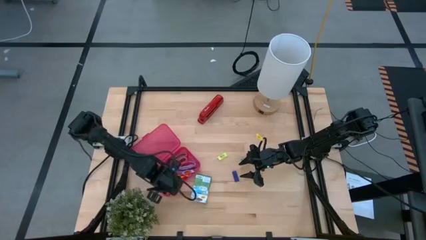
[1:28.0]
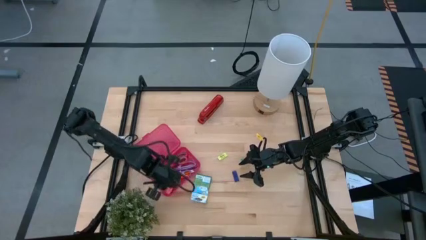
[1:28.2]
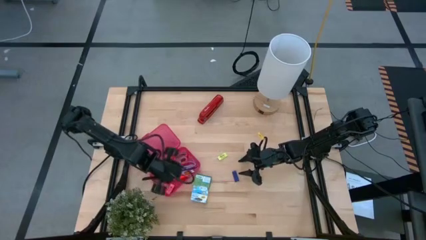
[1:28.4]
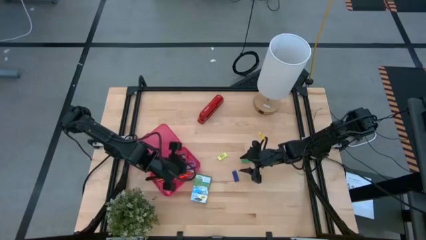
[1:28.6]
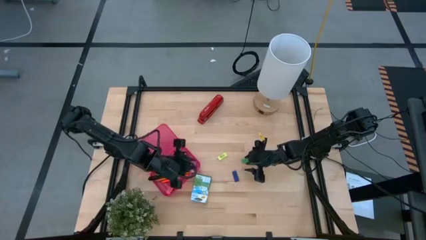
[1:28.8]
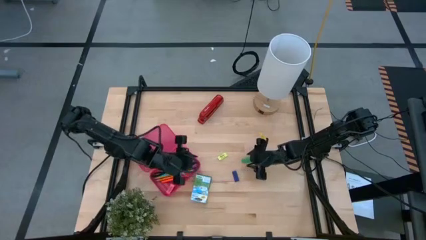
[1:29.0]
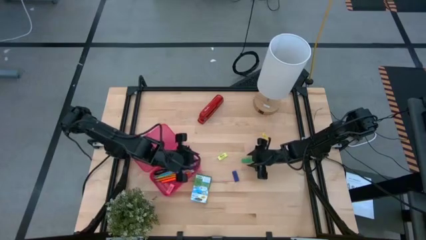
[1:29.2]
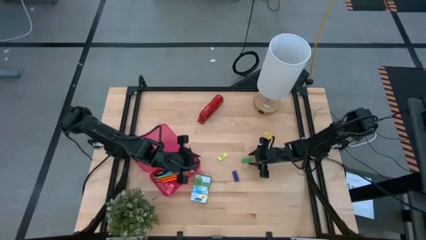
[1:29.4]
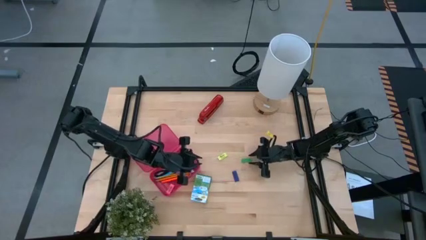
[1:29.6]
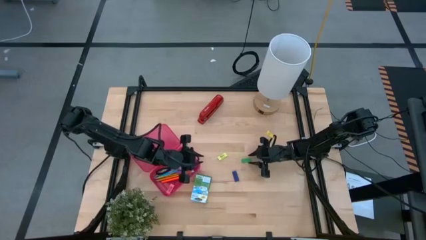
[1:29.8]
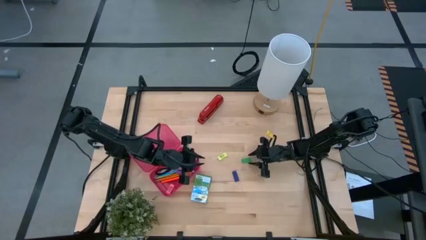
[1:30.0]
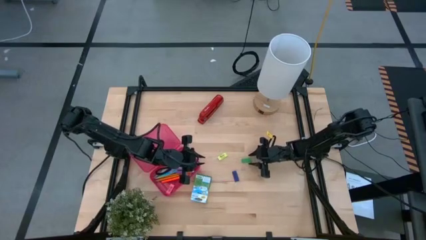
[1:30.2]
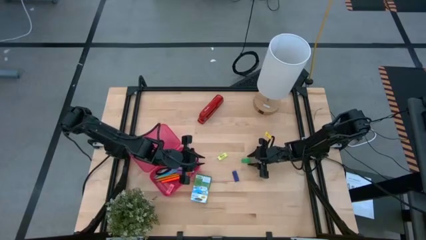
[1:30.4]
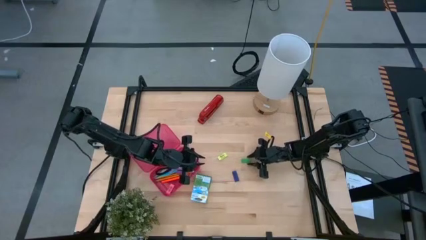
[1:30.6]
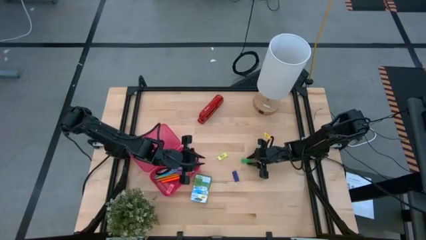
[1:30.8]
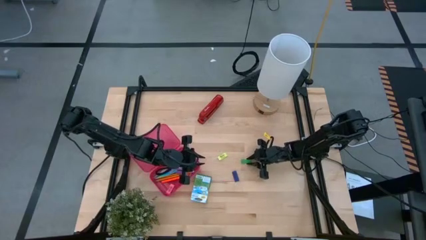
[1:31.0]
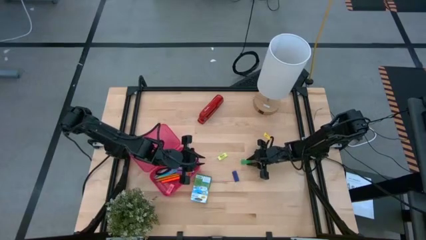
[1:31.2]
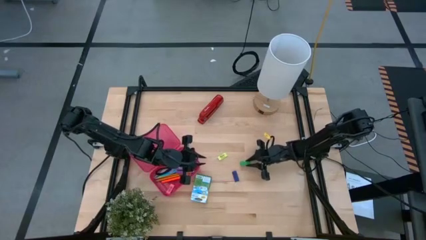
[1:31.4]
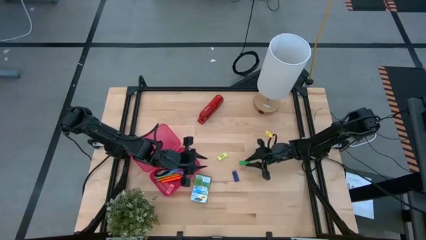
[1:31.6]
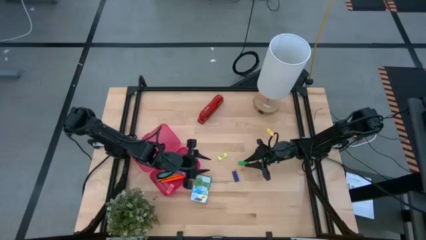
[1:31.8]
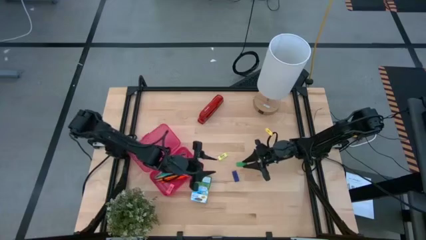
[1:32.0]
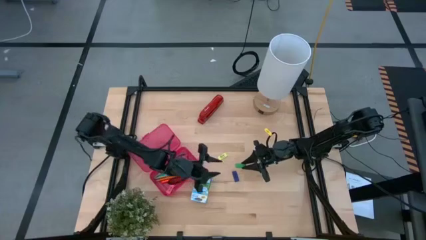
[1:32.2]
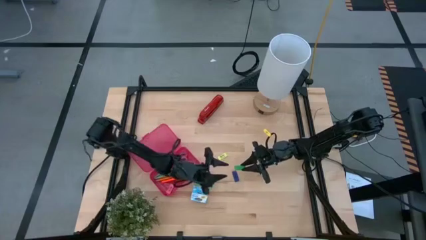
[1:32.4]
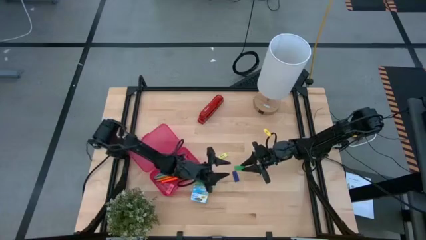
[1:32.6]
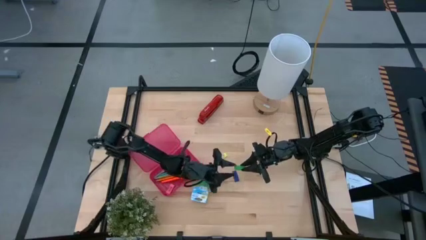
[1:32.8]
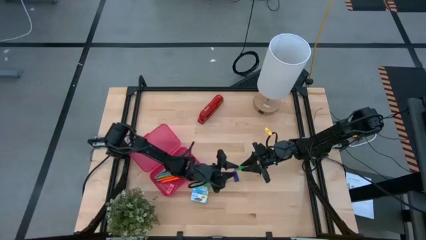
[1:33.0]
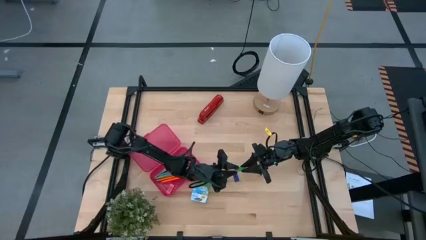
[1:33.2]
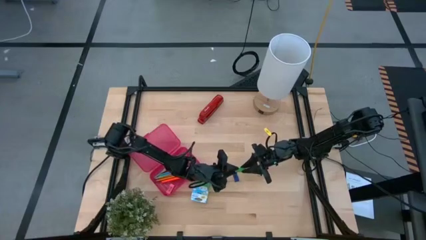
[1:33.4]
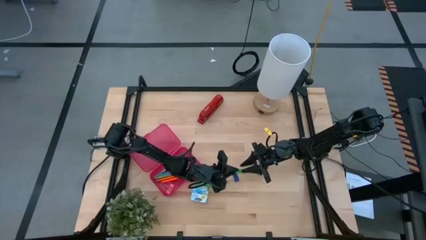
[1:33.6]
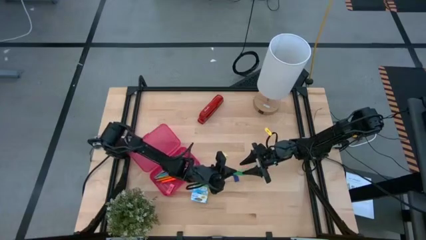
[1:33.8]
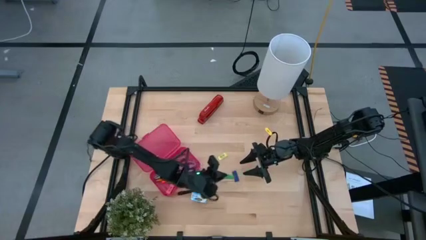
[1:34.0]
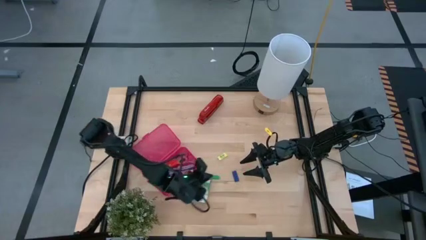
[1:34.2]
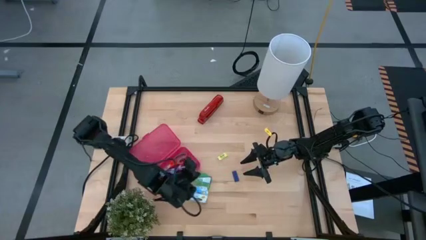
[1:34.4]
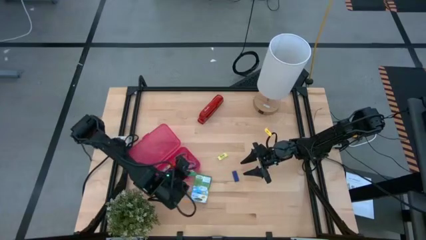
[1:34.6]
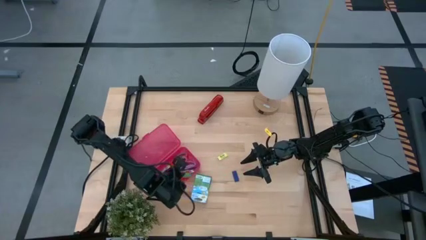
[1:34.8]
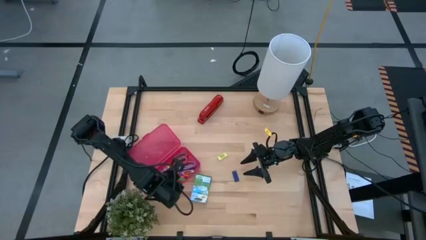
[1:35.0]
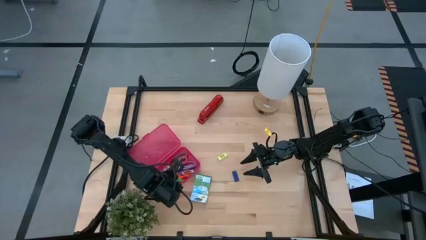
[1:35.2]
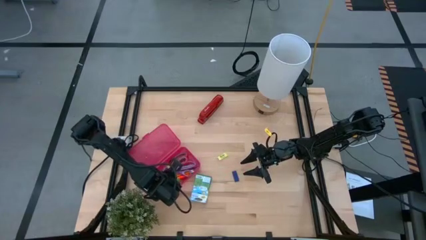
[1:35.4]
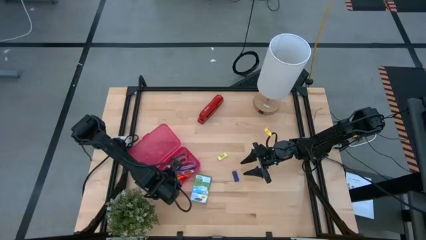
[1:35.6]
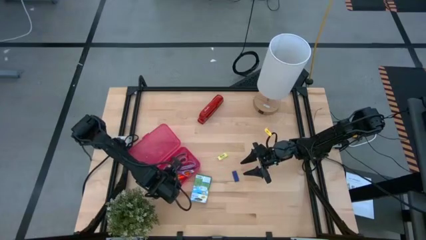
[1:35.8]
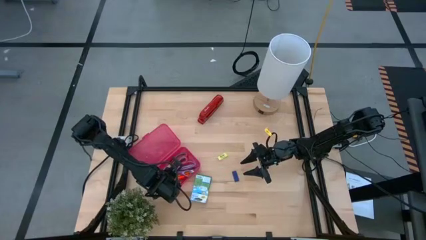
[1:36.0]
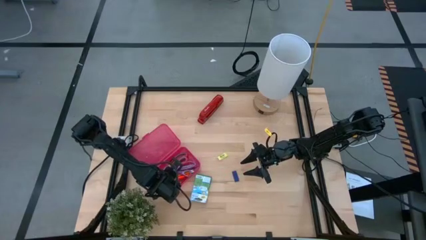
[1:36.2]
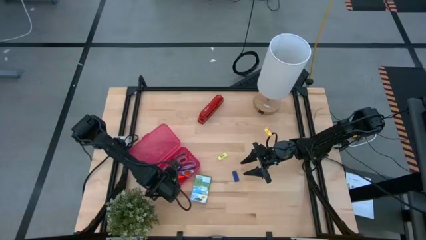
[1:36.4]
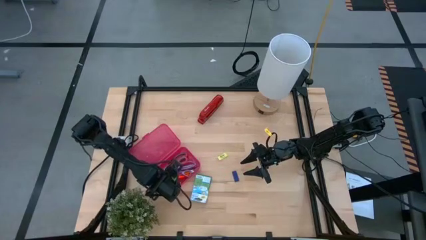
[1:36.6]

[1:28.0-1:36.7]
Task: Pack school essentials
Put the green eraser into the red supply box

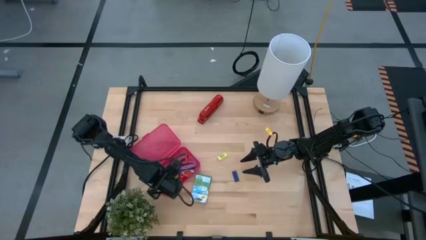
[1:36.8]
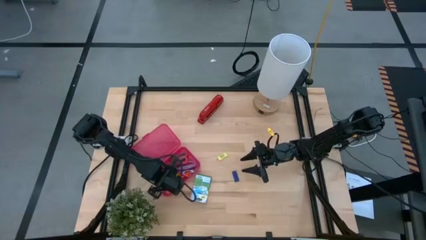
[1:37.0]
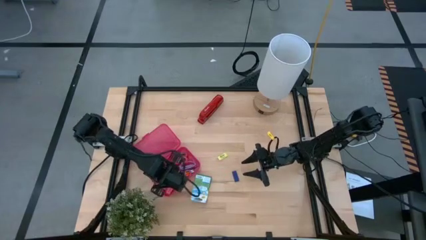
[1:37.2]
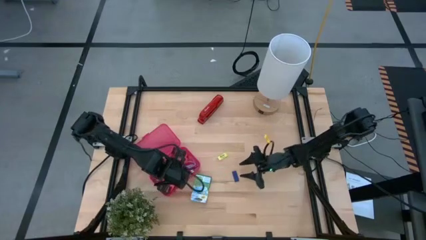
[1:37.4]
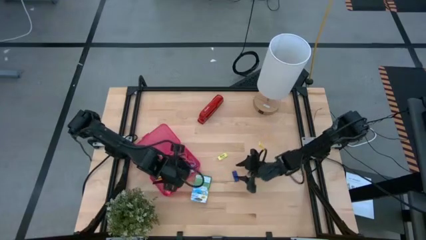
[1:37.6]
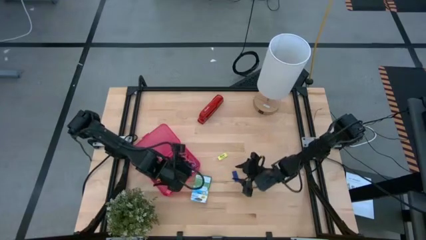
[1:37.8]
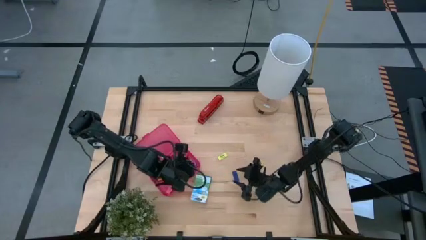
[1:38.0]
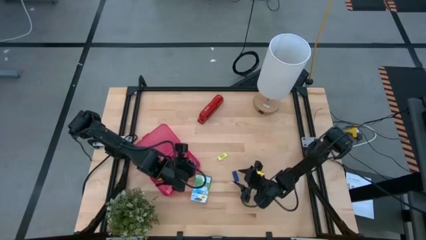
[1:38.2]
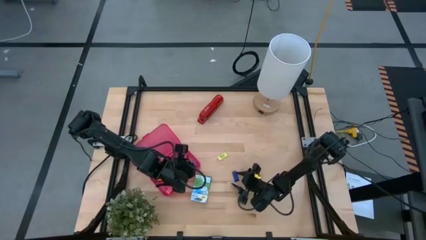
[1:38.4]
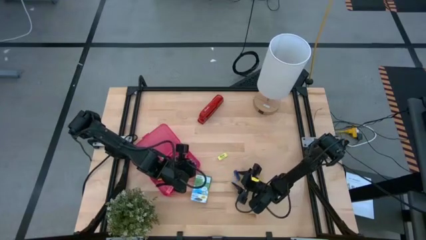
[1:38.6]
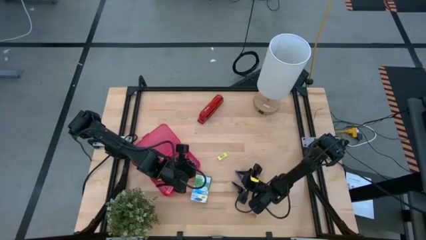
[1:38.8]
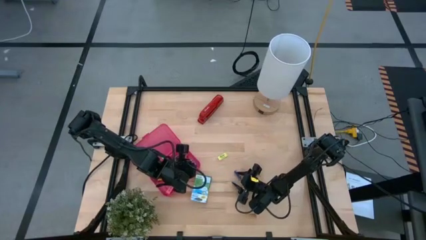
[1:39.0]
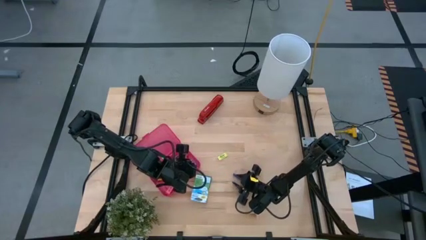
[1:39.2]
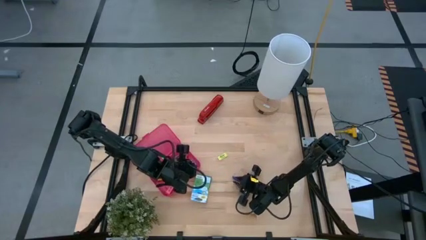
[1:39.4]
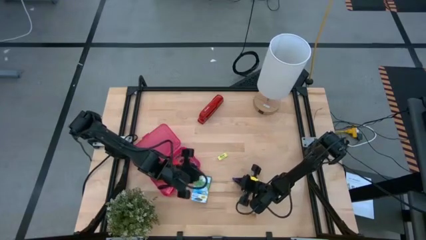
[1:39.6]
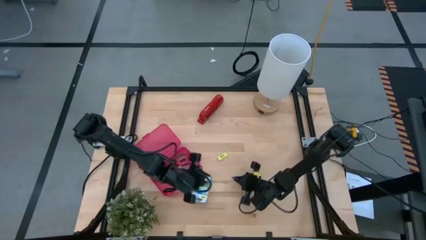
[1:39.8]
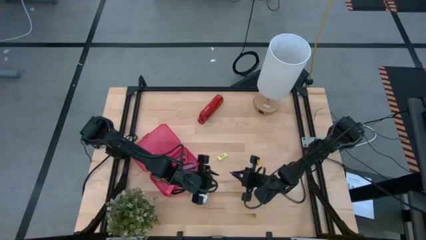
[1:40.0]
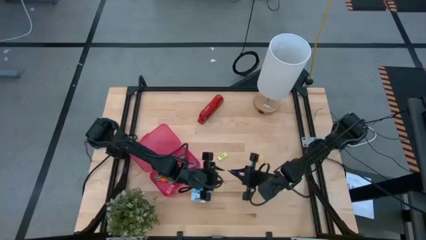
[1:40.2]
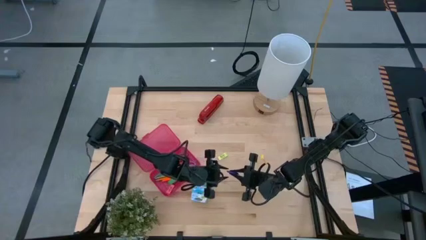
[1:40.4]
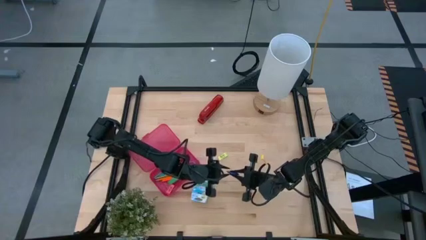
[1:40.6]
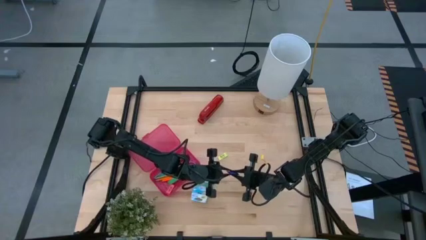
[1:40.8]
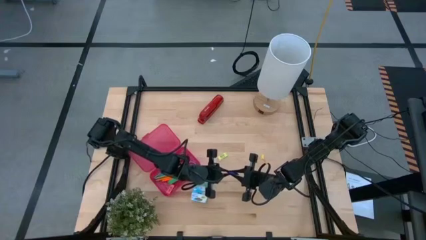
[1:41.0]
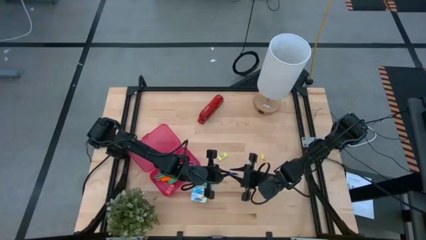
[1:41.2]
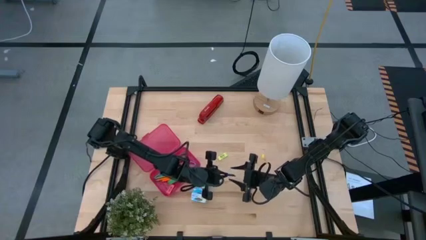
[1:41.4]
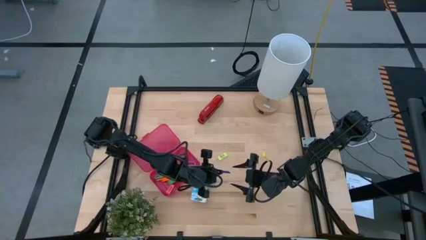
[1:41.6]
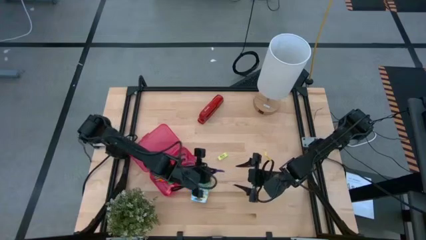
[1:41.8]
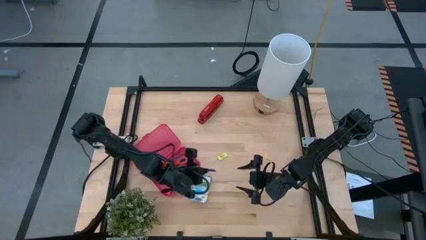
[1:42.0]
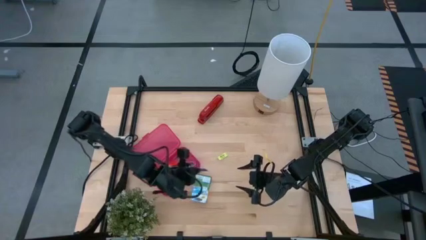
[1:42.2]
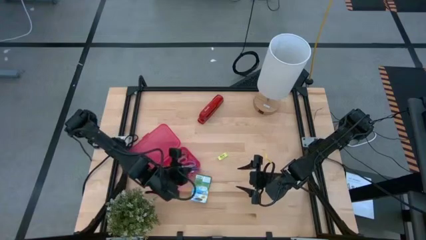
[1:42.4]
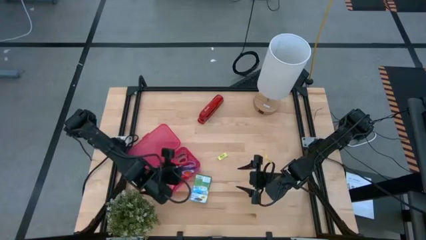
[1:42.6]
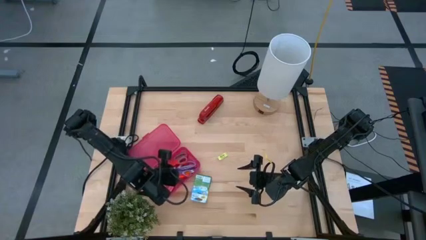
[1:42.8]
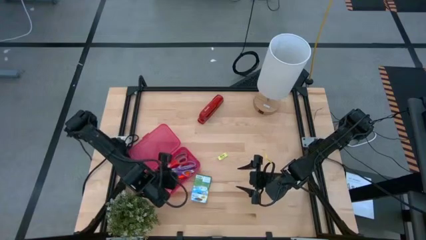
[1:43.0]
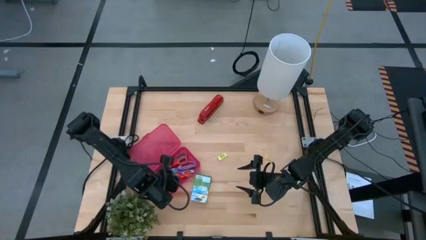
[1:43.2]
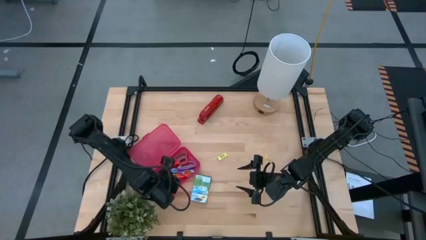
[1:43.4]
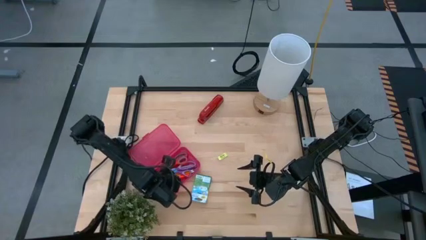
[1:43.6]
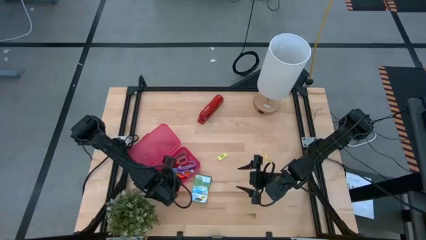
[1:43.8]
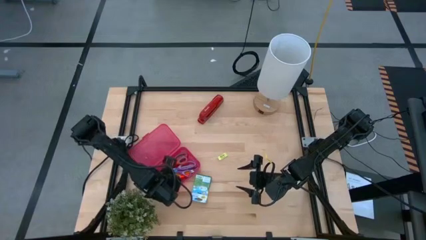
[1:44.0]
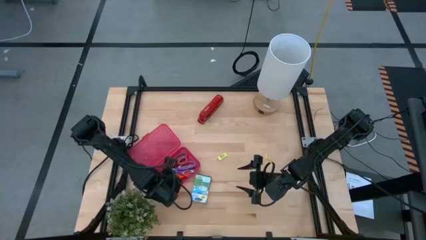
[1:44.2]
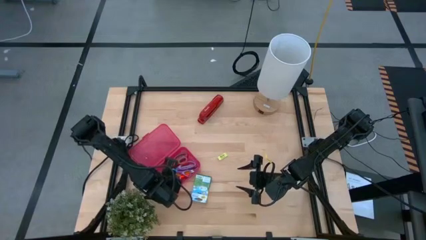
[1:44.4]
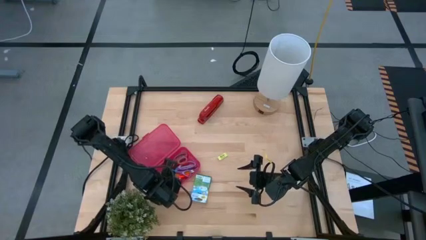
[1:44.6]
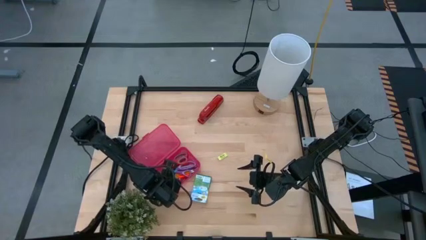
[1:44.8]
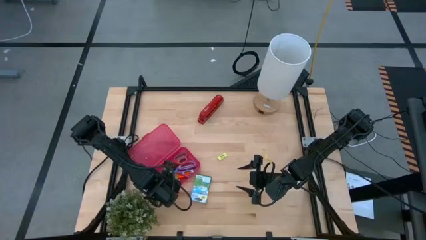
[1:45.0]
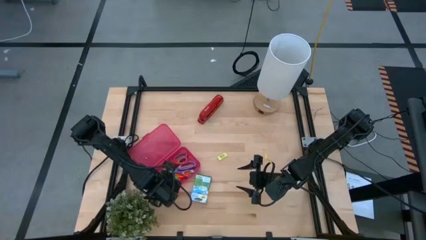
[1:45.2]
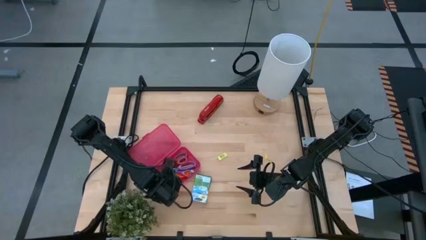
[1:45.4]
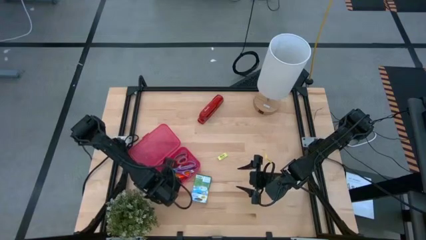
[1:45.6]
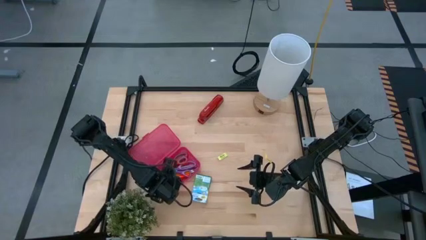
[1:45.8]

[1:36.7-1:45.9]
Put the blue eraser into the red supply box
